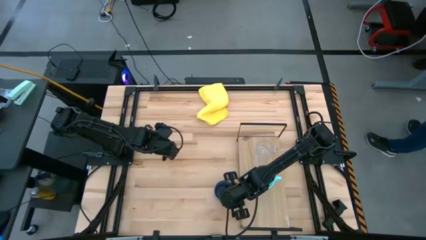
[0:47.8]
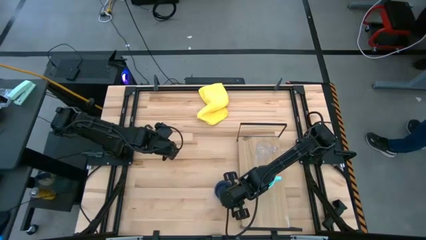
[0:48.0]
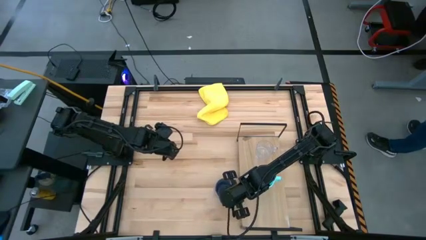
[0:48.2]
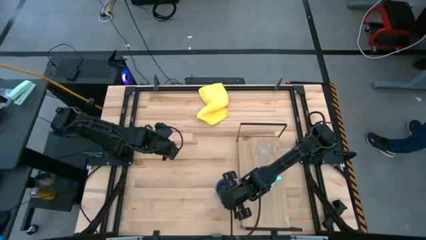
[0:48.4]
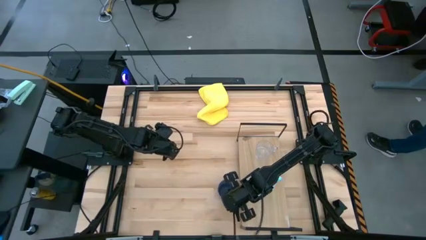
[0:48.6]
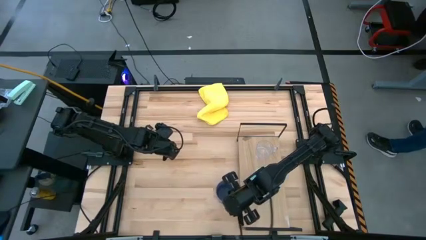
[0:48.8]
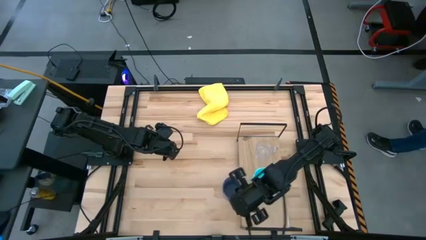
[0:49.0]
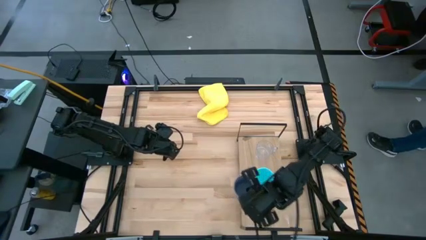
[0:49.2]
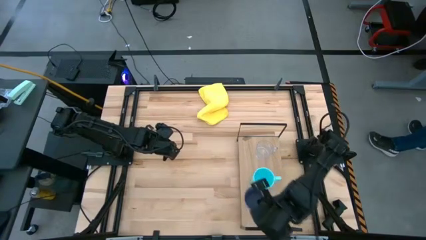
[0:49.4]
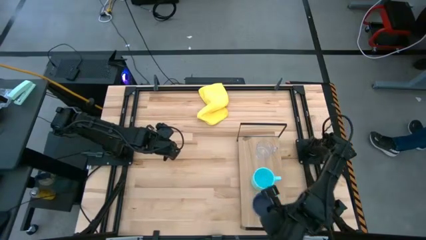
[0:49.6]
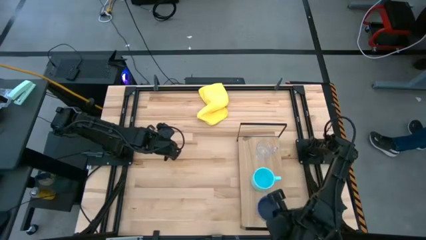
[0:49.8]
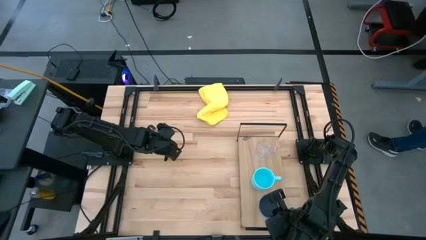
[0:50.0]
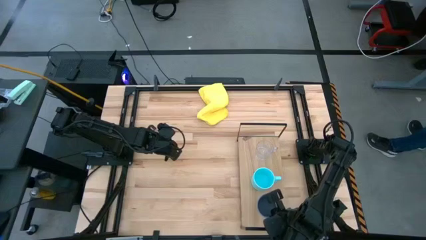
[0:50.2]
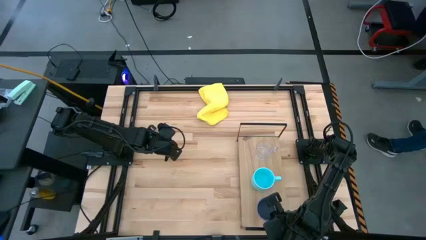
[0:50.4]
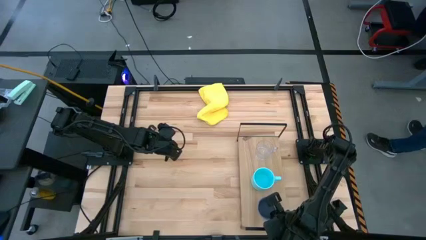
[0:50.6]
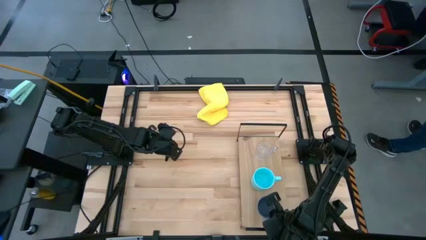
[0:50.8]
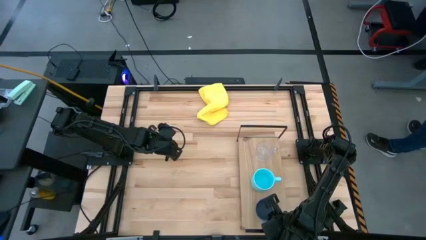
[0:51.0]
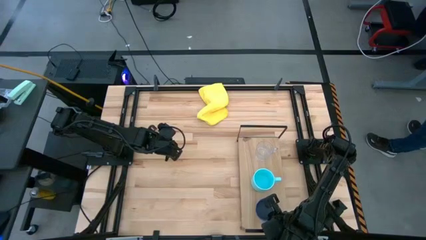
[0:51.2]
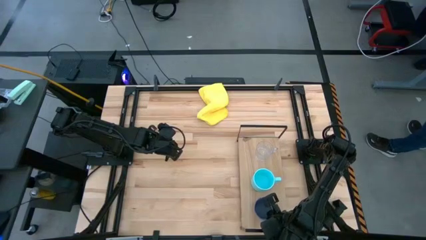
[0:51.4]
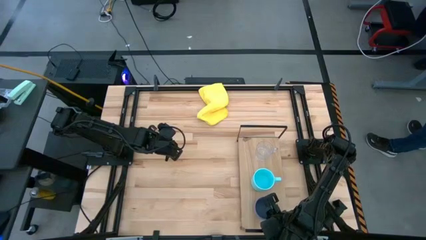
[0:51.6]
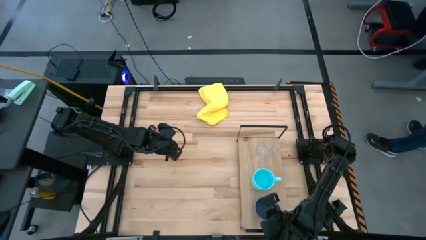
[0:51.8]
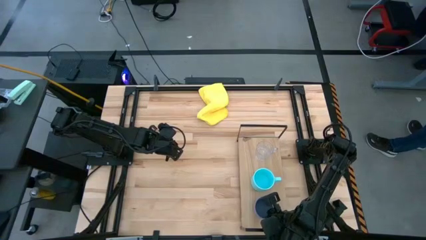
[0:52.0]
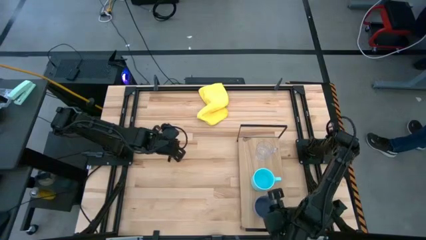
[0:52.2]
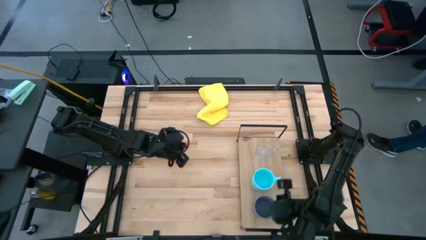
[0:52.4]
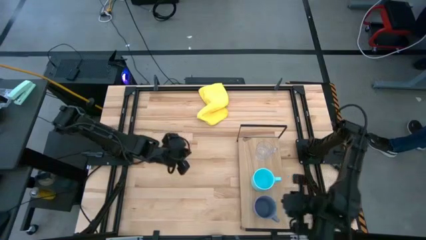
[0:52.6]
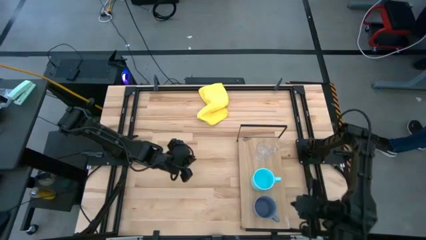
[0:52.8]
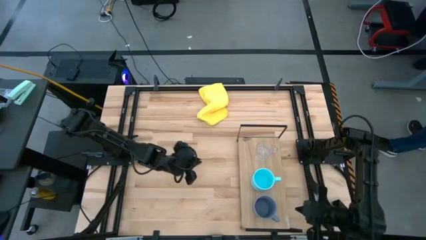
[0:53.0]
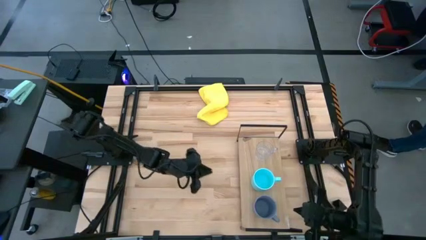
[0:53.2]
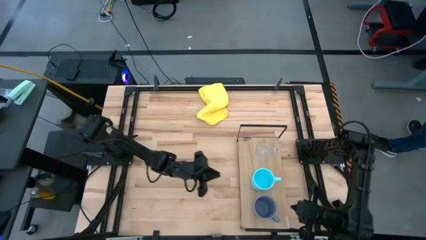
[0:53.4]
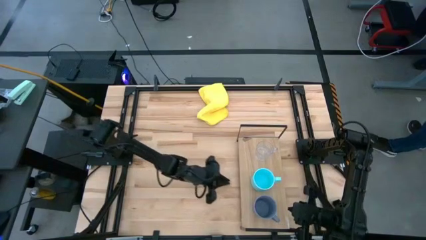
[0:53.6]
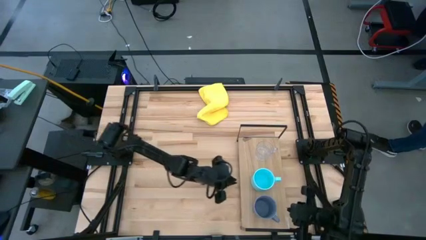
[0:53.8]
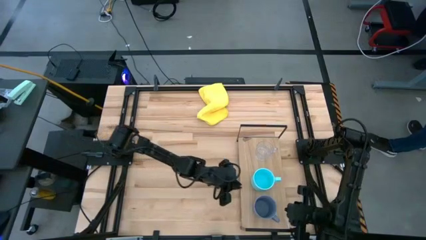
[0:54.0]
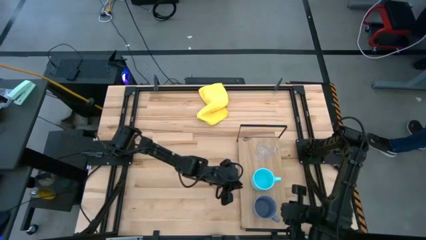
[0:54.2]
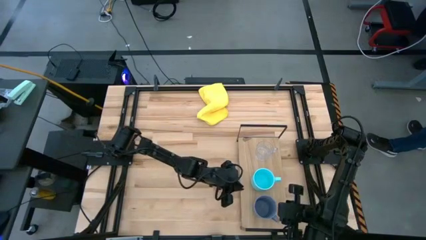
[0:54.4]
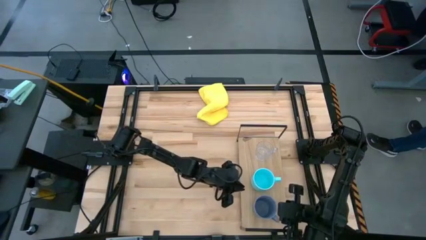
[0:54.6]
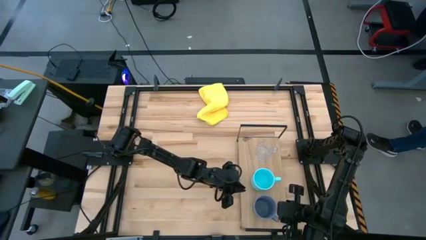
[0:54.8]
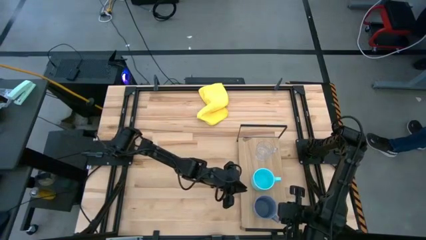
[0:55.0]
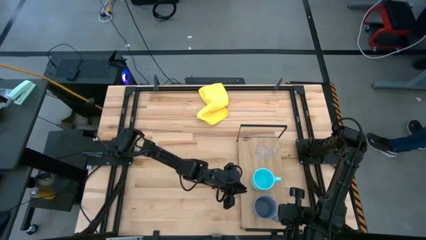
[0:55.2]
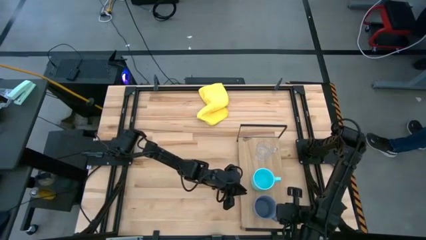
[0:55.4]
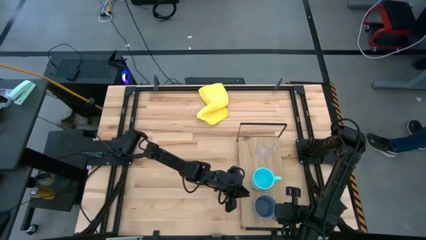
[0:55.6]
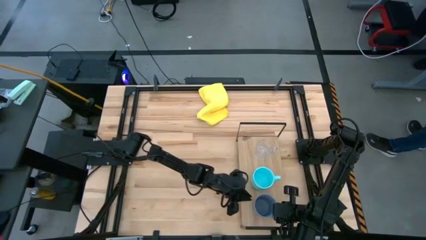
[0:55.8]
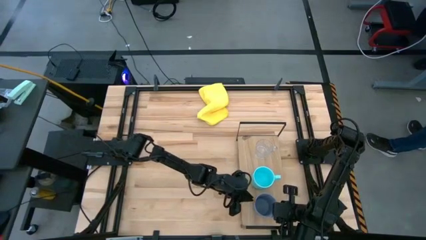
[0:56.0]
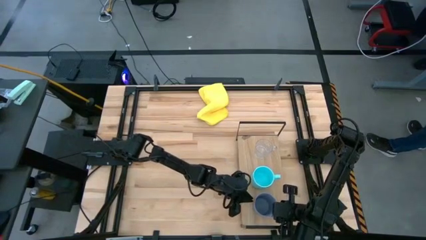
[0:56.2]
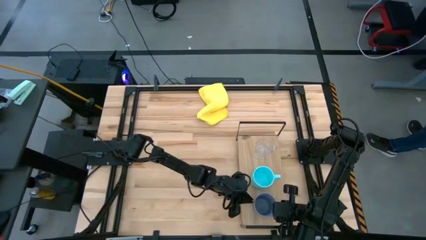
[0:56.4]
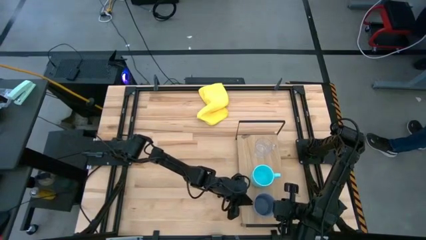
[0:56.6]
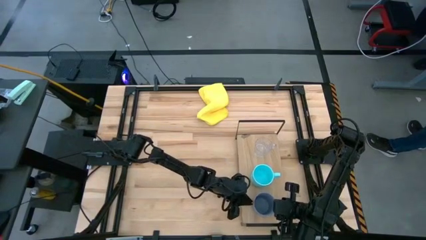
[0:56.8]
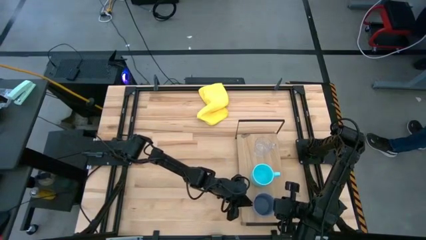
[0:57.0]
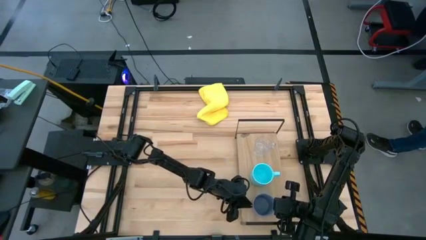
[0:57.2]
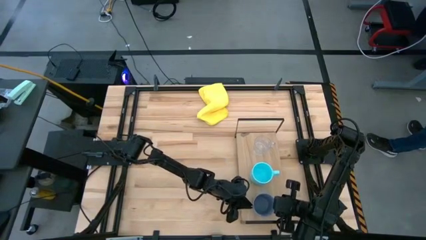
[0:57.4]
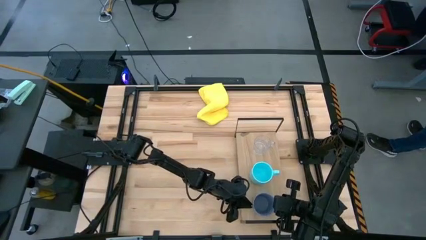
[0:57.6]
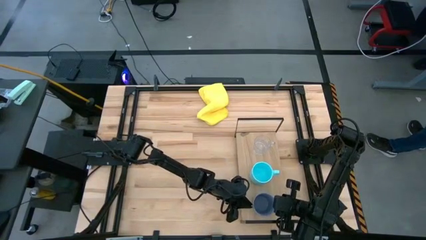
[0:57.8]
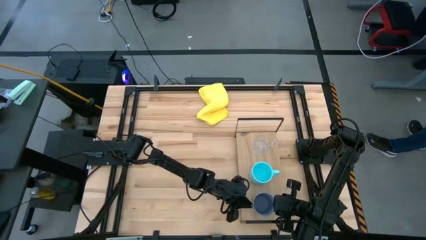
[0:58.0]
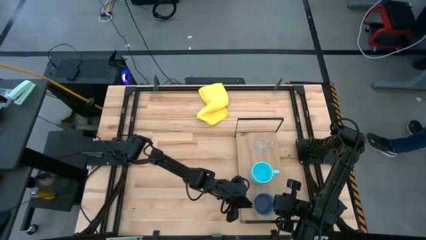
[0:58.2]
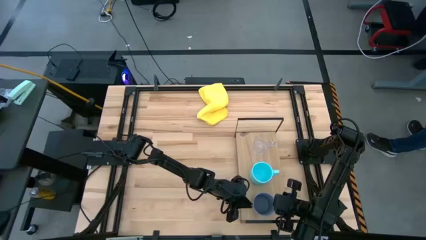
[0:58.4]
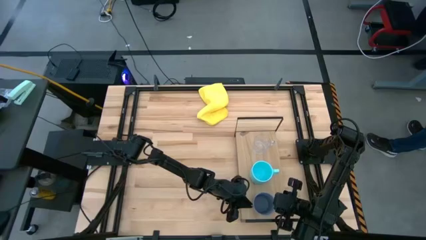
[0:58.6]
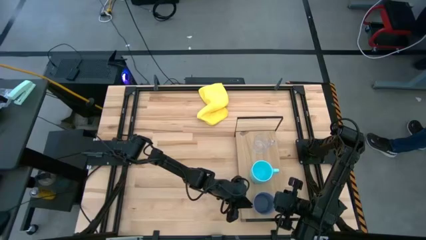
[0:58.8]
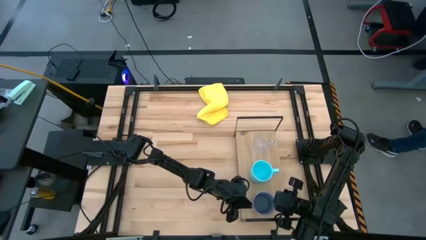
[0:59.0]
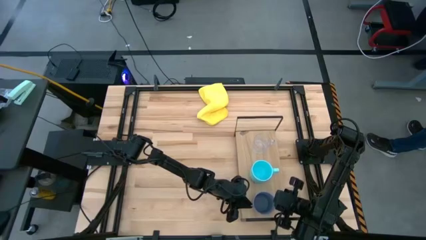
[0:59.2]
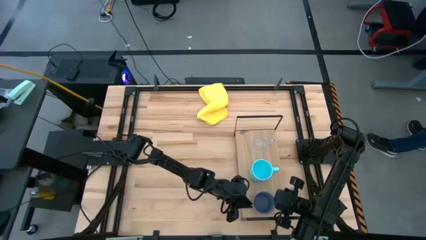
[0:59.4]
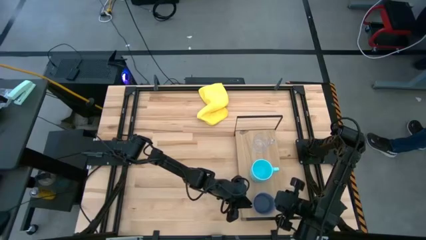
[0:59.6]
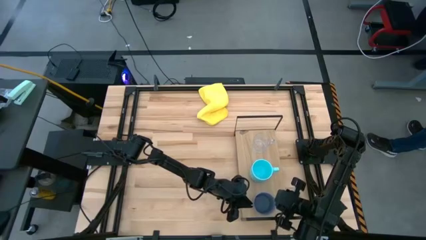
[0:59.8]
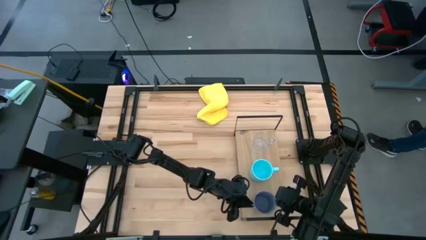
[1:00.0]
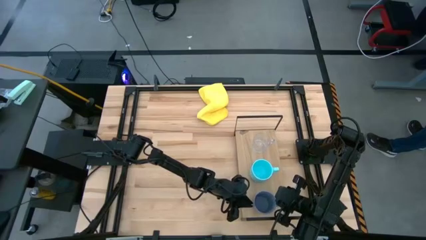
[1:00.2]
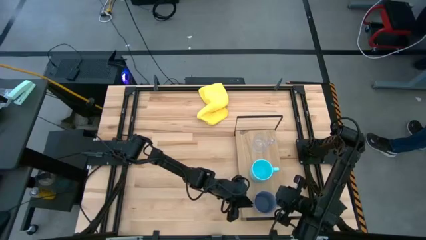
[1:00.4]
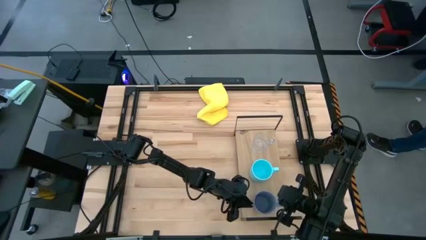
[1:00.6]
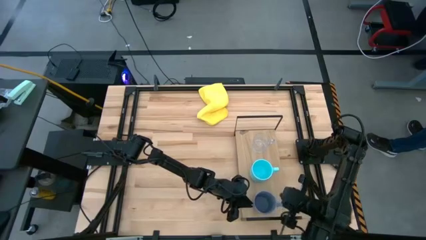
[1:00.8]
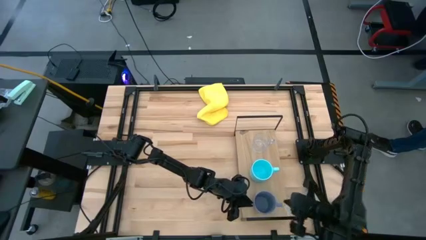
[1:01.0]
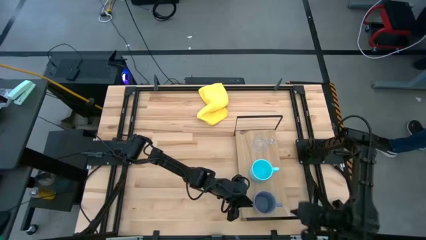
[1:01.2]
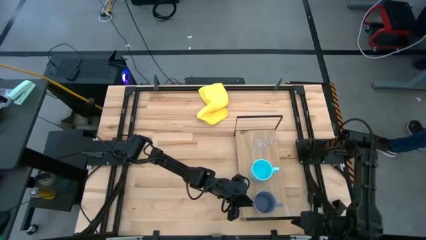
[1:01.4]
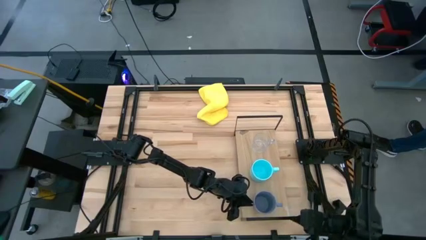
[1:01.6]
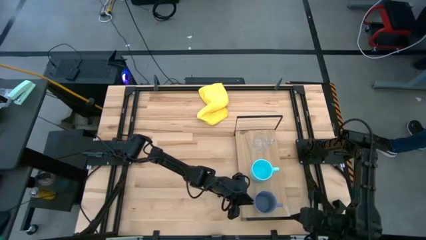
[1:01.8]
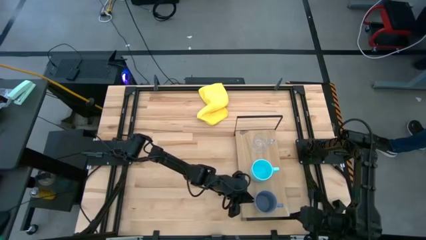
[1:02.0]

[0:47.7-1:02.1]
Task: Stack small to large cups/mugs on shelf
Put the purple mug on the shelf

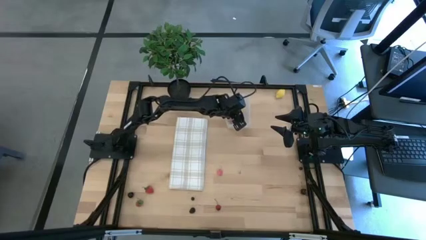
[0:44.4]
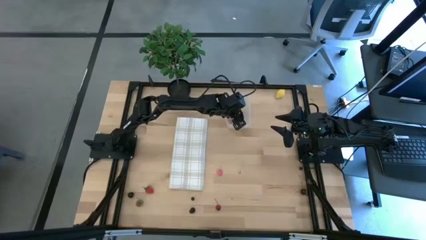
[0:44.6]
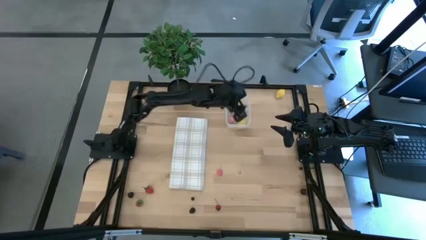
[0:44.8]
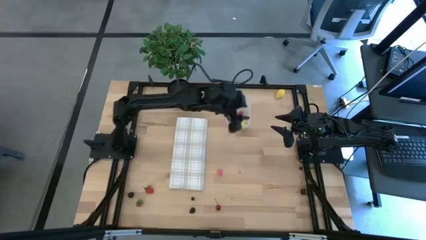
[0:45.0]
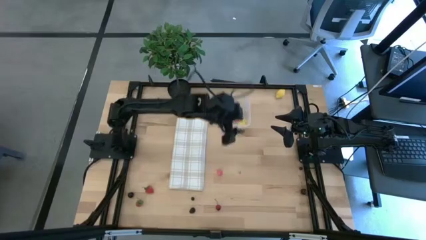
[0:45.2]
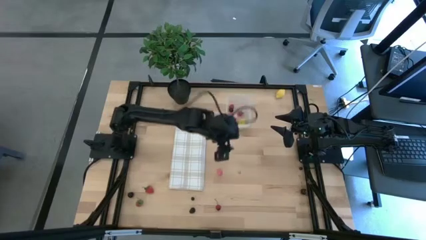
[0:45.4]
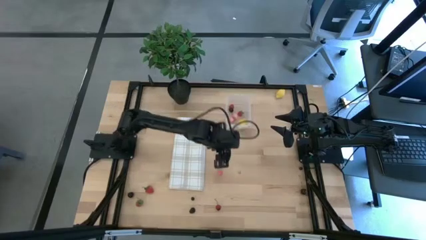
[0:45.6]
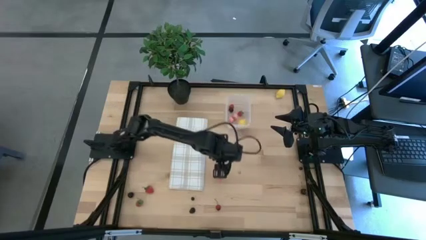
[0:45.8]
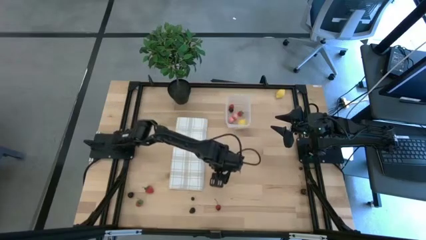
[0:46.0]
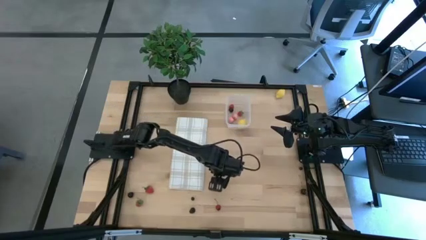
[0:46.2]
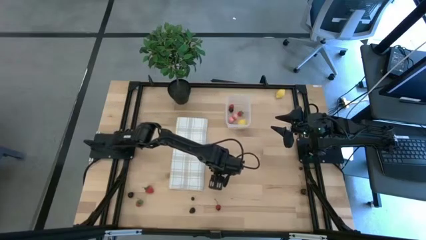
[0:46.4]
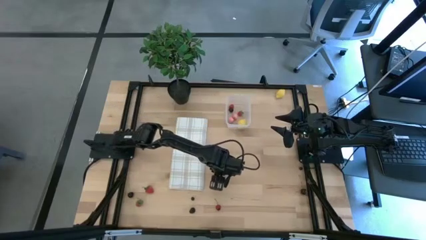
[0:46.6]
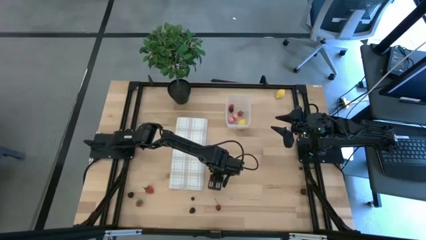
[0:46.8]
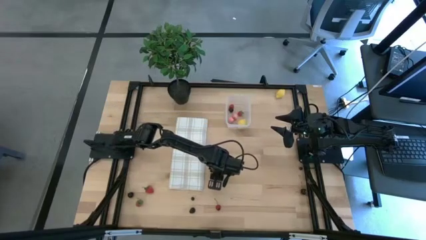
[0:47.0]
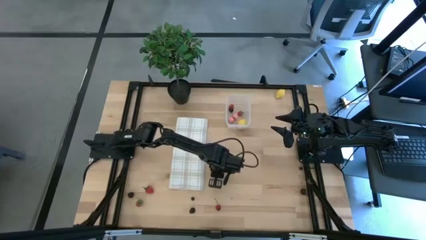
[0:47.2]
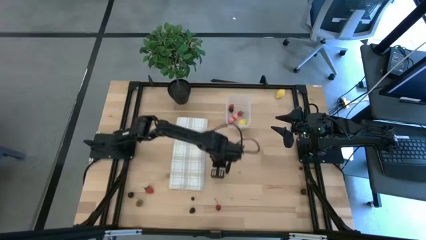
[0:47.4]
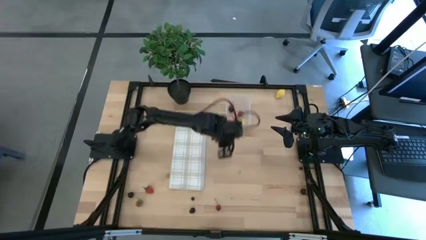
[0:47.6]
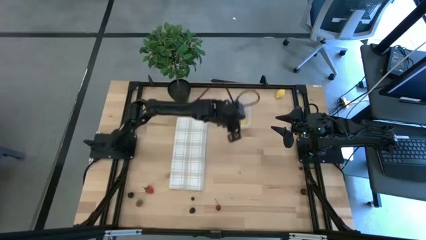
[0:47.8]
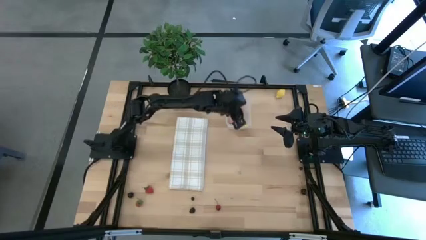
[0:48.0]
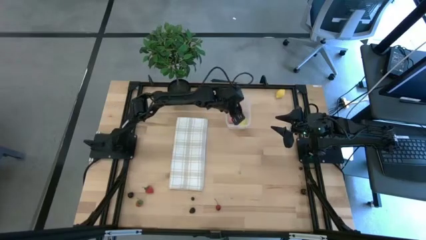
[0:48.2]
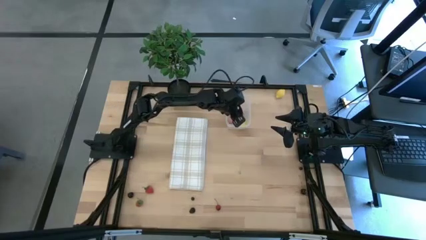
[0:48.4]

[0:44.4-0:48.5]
Task: Pick and placing Produce into tupperware
Put the apricot into the transparent bin
